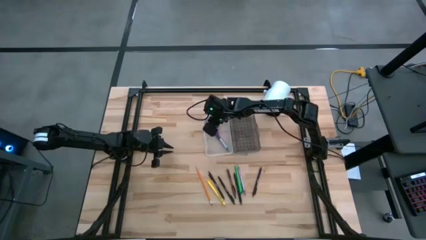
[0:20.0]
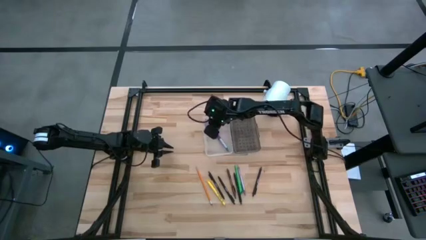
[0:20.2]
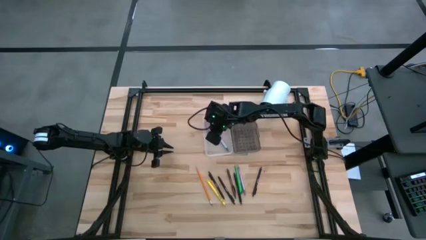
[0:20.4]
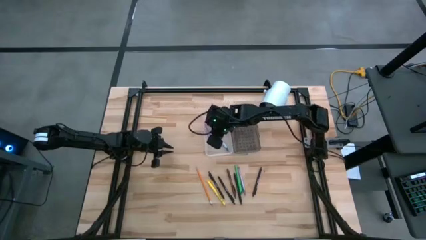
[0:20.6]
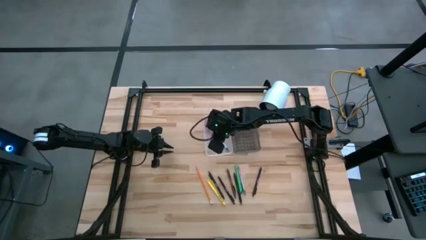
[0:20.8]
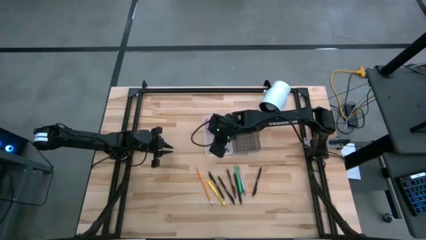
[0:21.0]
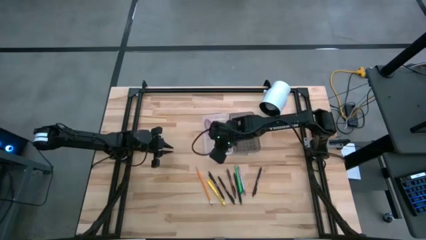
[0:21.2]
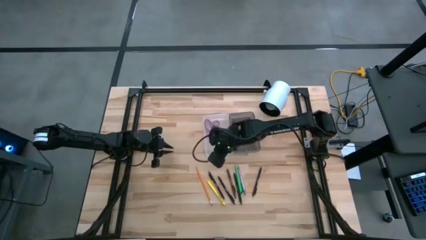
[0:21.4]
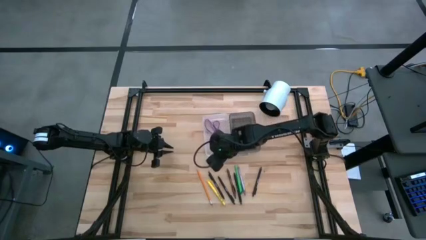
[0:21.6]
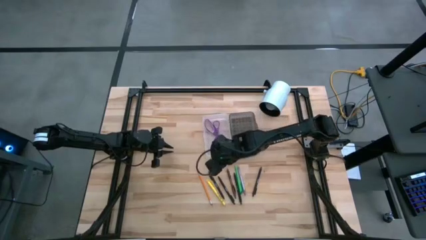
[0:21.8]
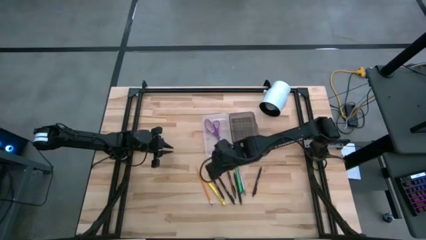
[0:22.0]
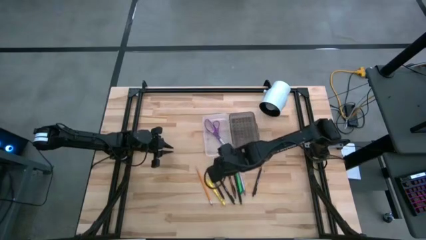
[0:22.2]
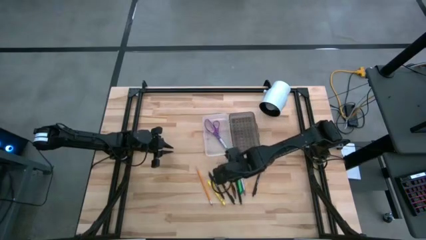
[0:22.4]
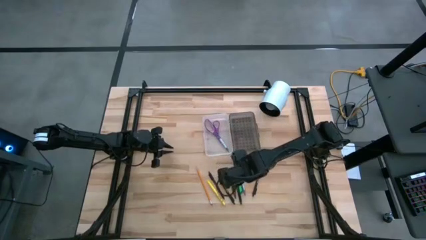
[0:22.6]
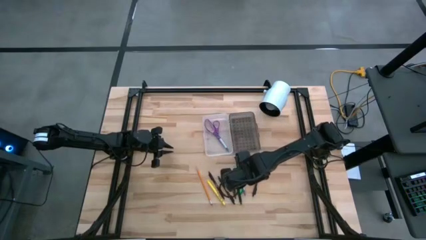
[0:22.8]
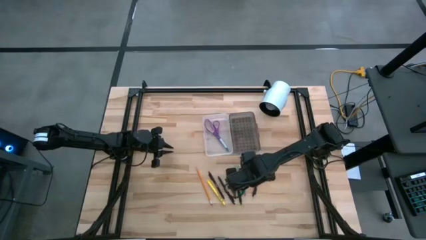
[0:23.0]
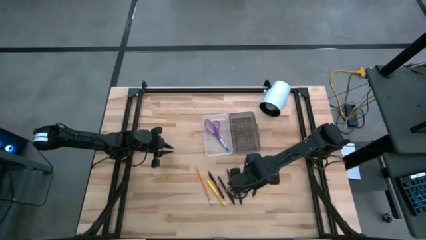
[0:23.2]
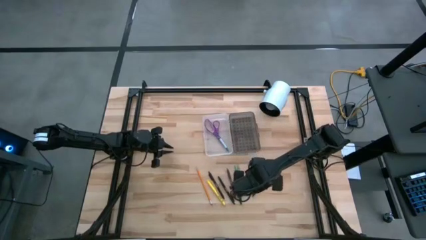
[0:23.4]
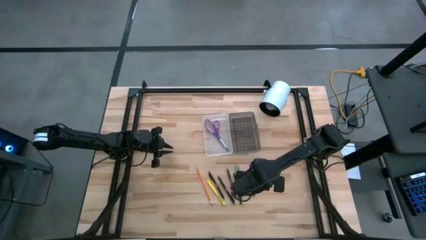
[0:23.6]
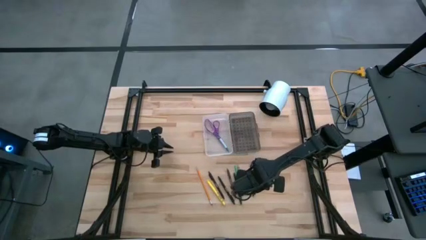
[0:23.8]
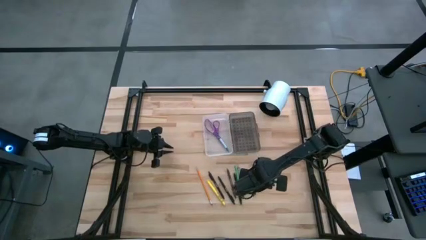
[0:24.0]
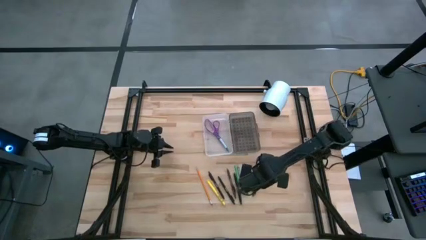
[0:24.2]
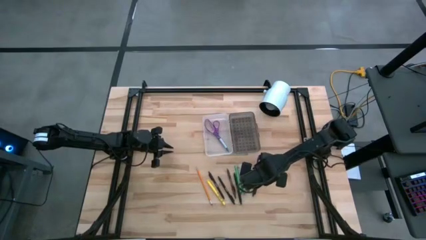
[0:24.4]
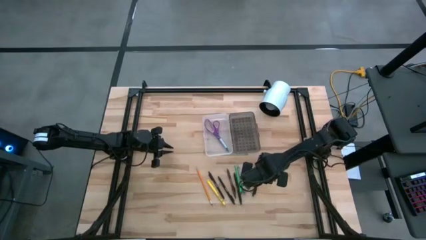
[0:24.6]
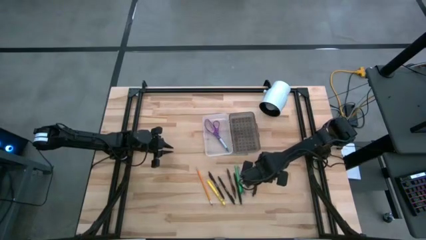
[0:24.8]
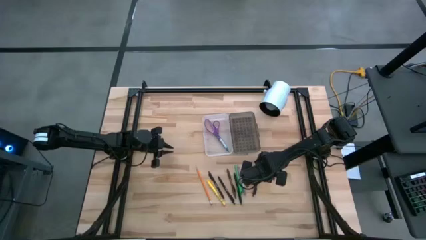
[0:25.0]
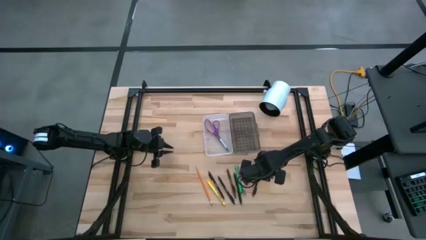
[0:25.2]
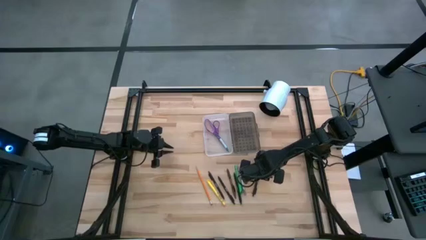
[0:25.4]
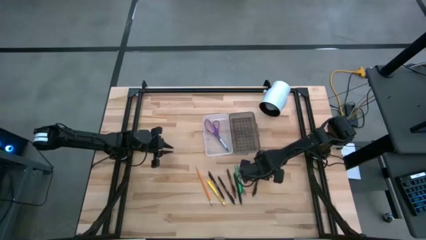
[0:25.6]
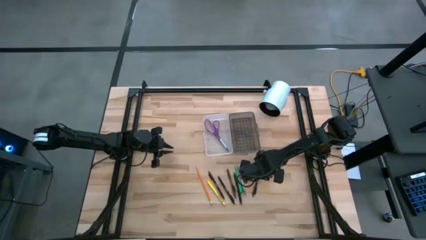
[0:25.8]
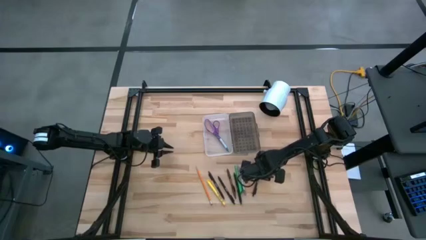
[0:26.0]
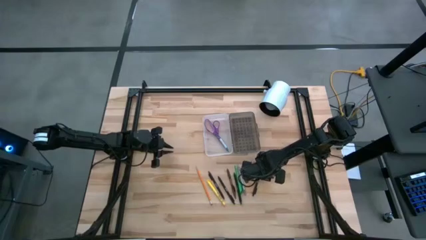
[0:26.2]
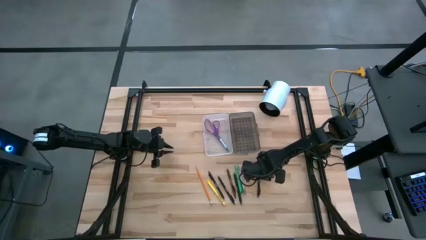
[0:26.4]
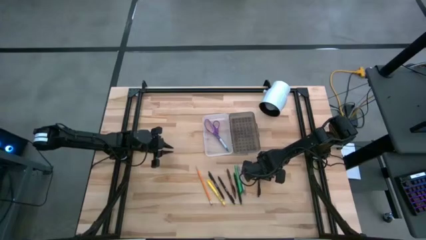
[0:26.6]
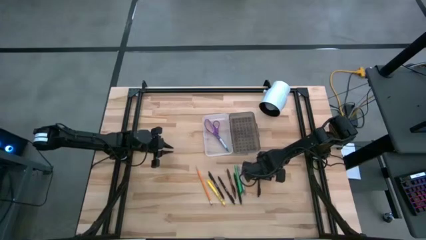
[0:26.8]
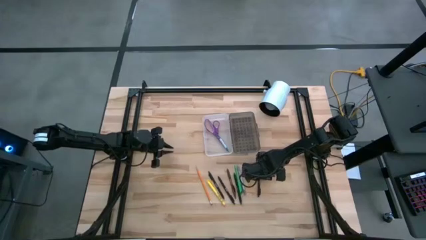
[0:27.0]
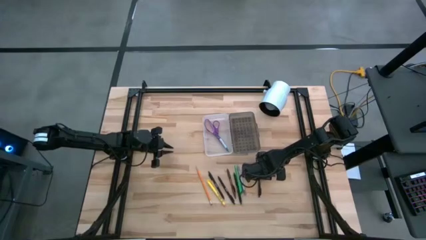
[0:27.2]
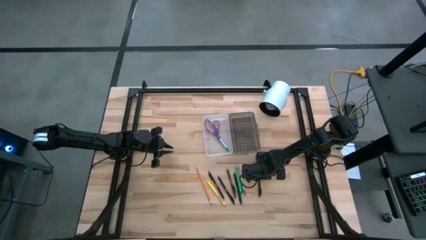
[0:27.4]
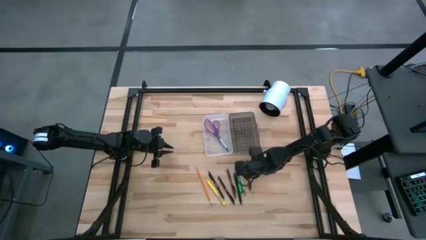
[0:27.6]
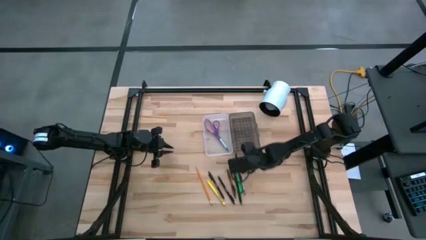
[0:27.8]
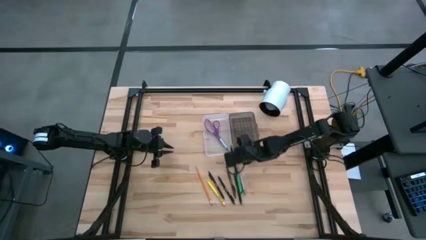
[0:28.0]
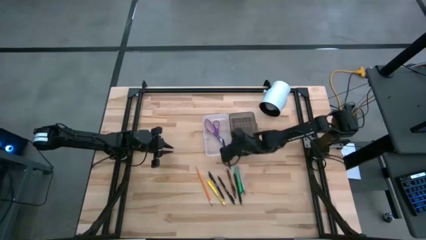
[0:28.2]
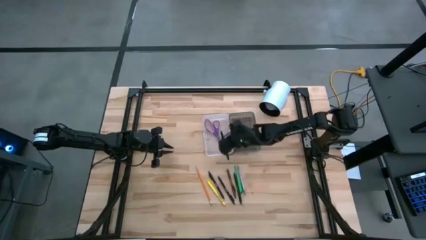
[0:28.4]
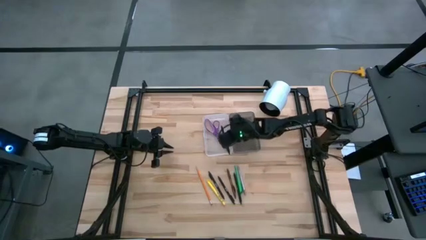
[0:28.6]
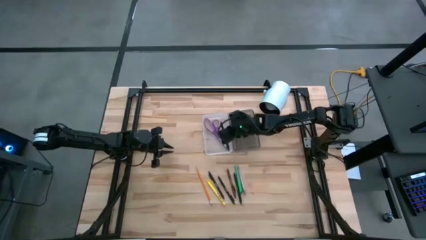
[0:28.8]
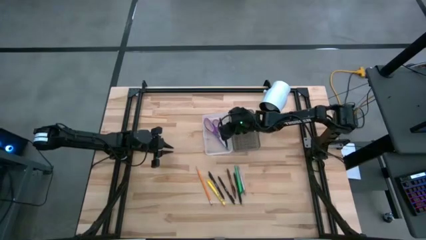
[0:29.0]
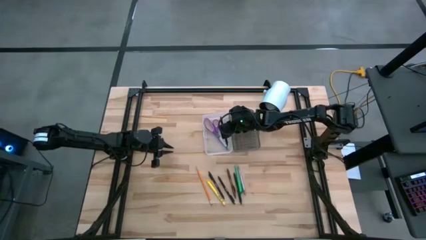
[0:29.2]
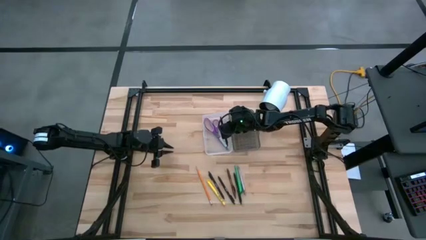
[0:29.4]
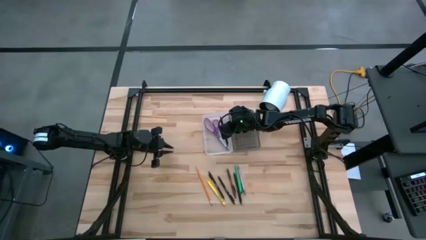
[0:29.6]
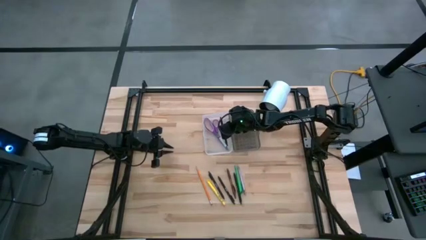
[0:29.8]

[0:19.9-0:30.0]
Task: Pick & place school supplies into a supply box
Put the black pen into the supply box

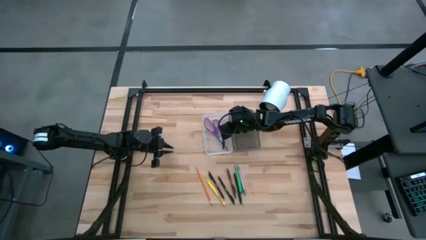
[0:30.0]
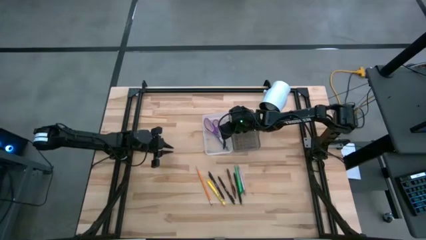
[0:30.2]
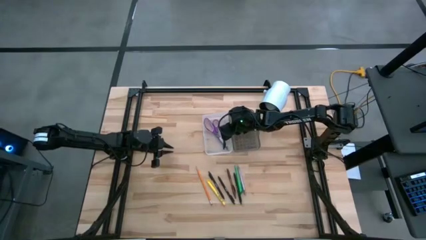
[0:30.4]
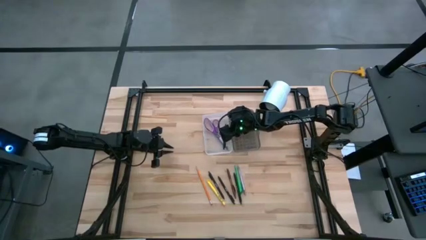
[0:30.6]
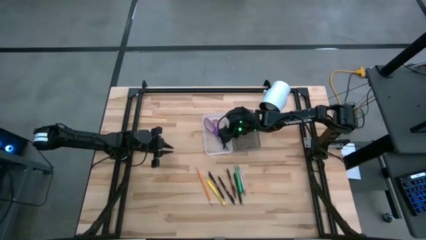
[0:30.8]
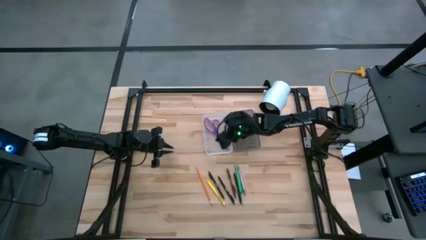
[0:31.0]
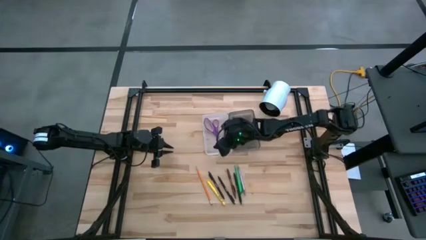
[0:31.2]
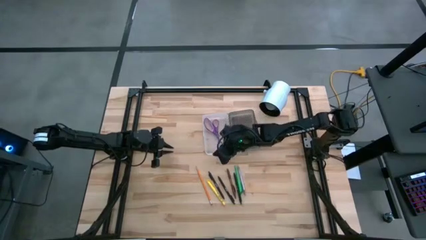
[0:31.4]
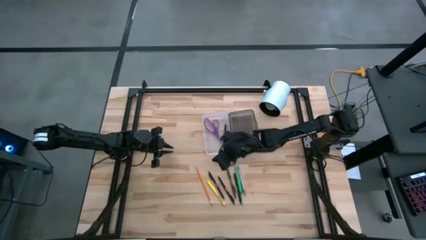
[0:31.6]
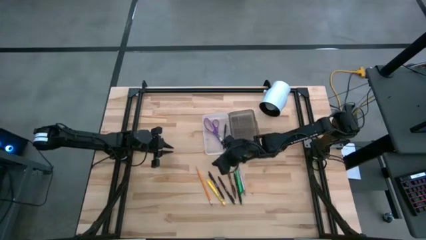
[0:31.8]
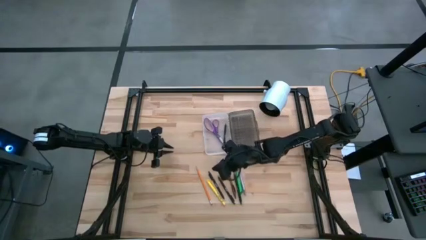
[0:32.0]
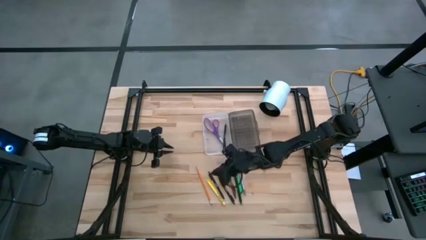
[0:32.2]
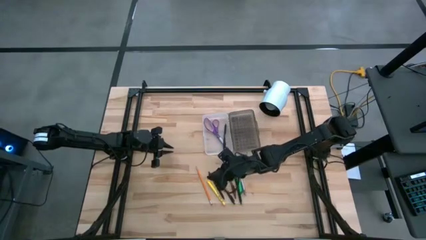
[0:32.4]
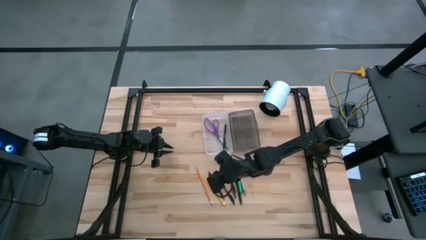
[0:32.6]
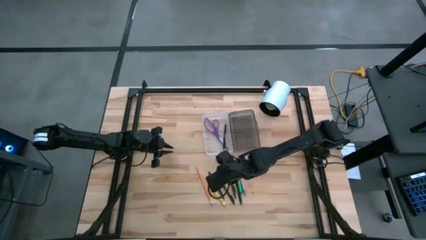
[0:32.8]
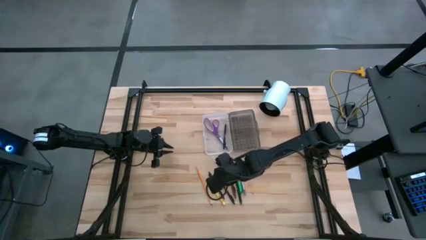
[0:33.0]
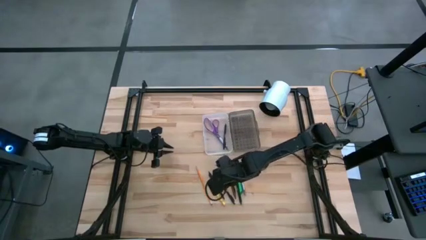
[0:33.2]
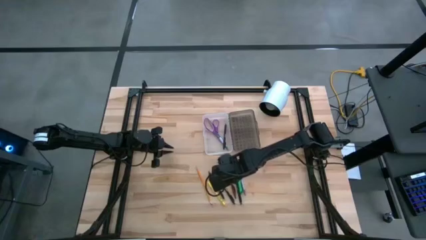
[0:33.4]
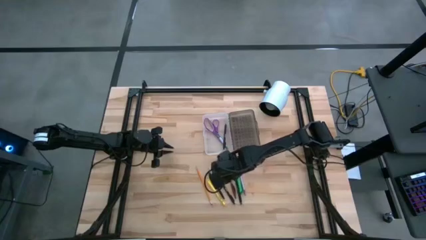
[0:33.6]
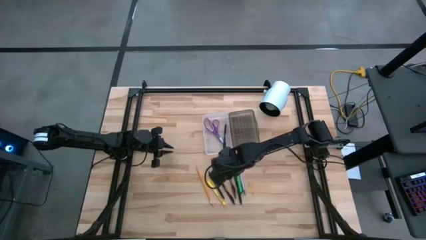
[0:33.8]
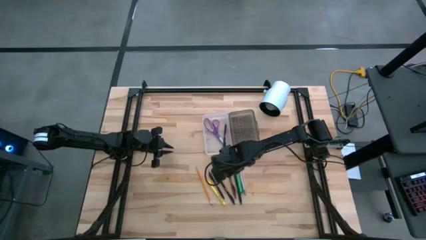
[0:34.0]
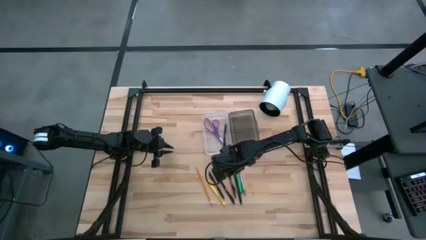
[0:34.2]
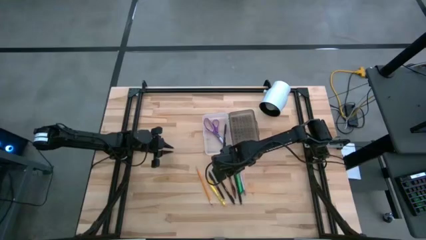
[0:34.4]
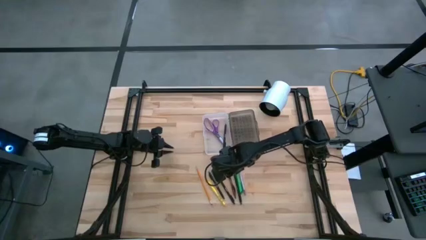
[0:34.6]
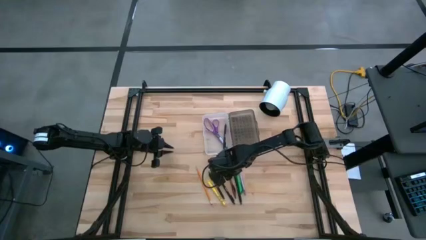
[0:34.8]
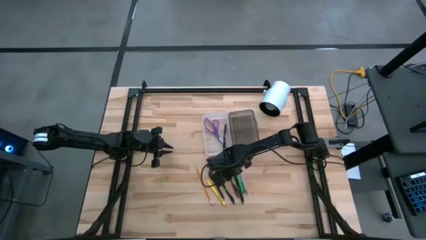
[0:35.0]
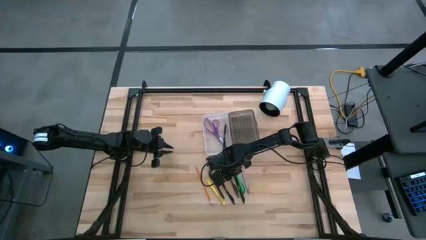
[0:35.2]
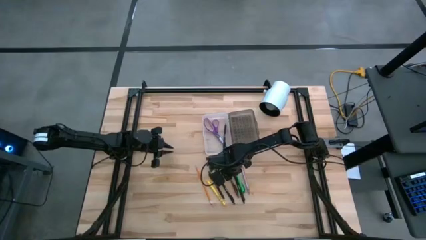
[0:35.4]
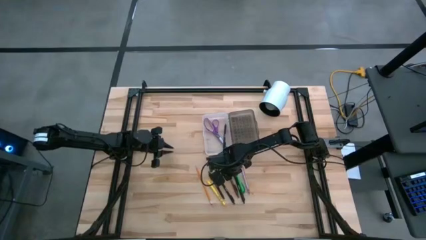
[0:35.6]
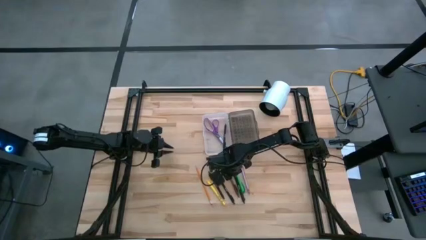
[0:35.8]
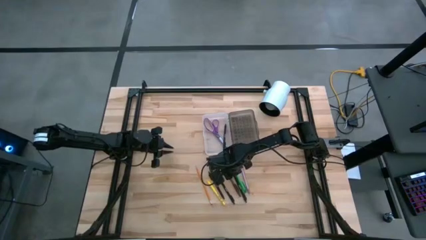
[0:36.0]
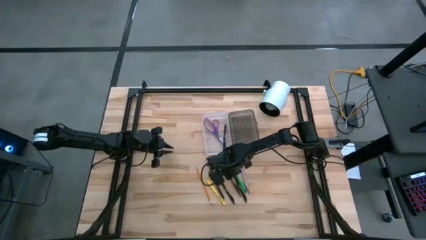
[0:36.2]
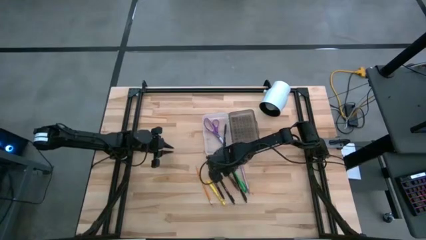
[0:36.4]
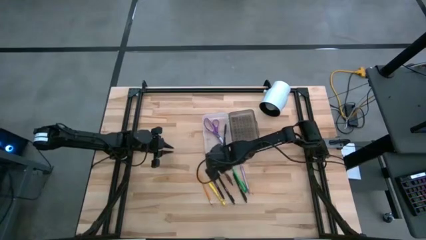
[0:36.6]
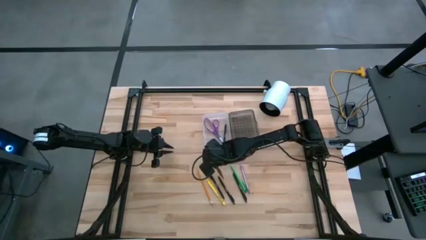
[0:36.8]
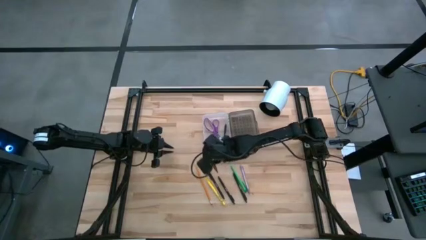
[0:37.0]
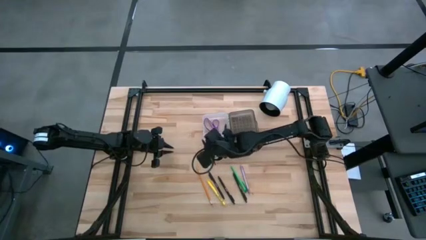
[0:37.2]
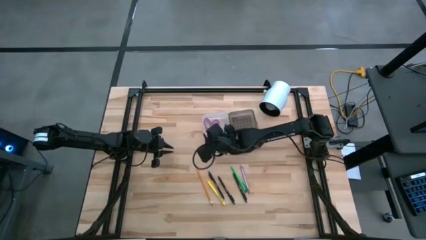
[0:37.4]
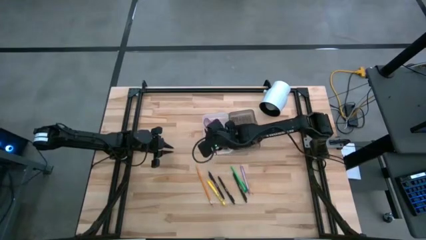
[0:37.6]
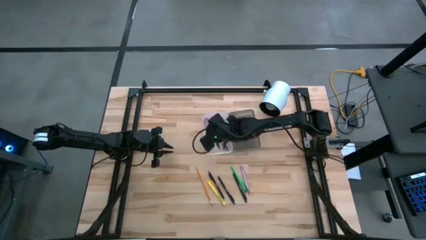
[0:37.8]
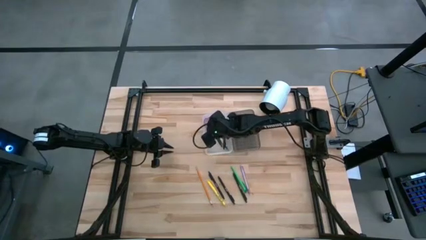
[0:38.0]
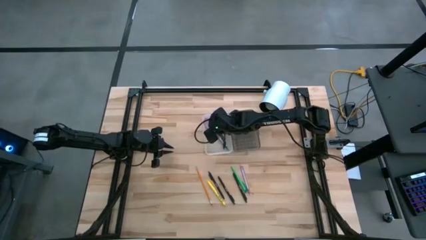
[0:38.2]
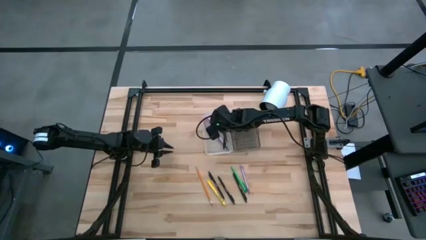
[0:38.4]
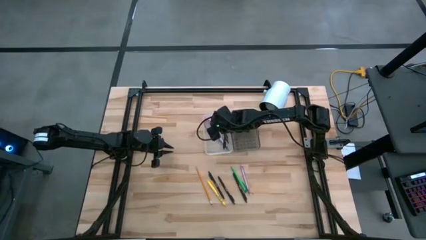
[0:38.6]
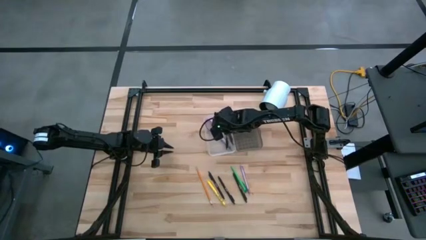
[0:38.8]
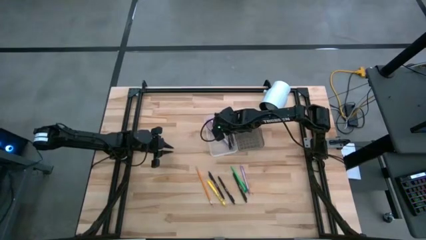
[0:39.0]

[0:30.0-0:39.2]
Put the brown pen into the supply box
